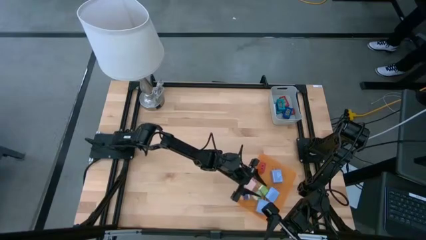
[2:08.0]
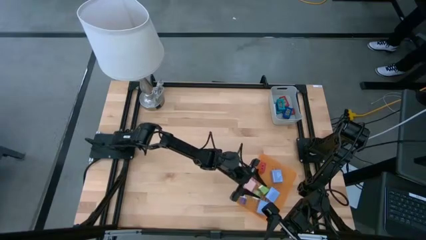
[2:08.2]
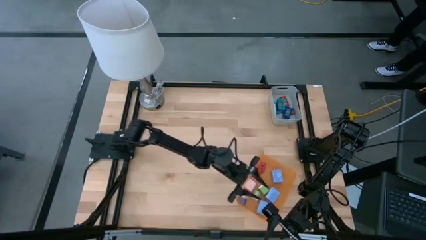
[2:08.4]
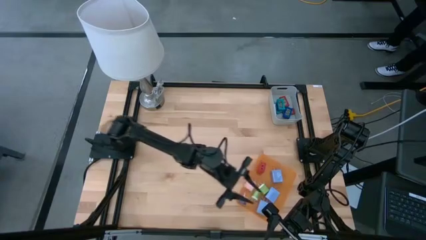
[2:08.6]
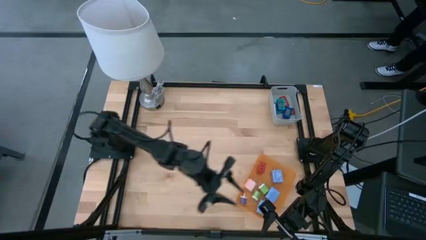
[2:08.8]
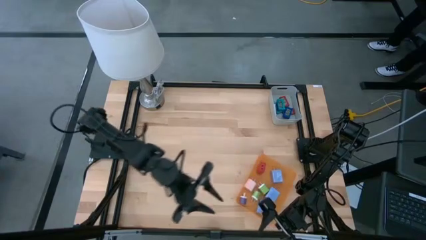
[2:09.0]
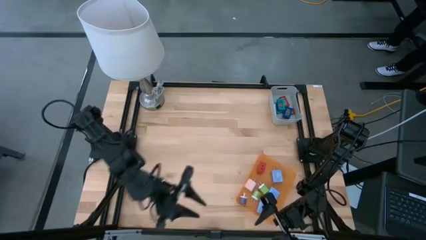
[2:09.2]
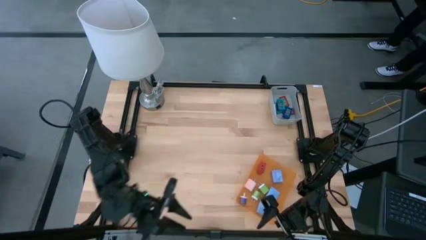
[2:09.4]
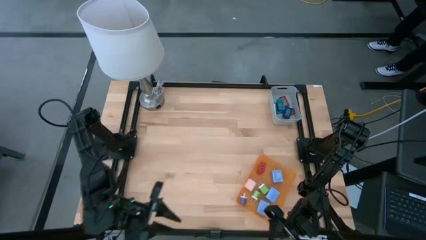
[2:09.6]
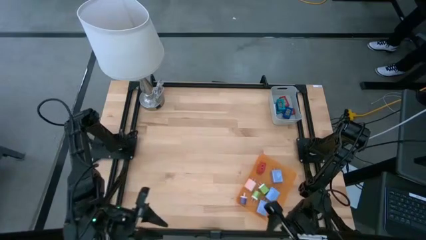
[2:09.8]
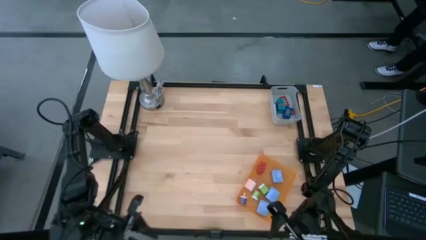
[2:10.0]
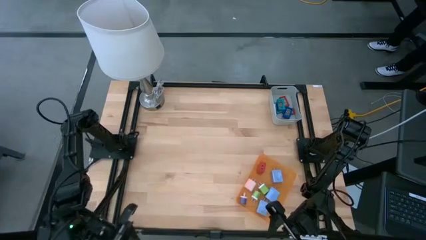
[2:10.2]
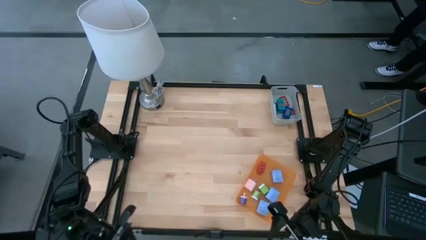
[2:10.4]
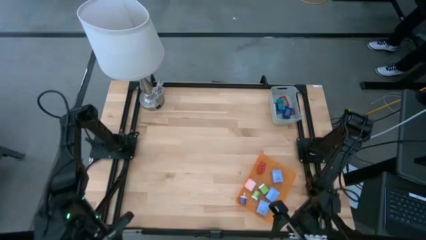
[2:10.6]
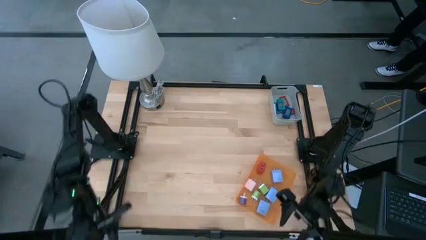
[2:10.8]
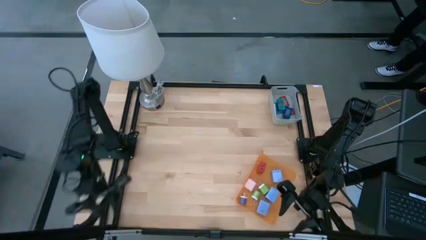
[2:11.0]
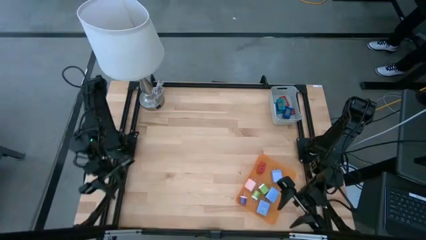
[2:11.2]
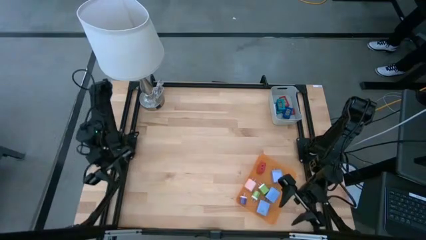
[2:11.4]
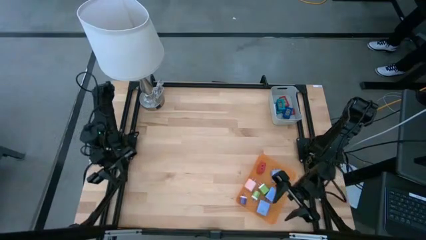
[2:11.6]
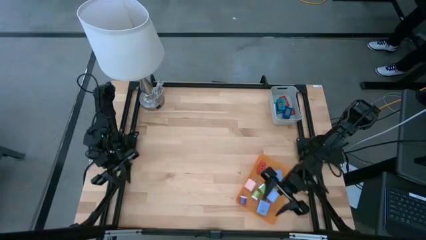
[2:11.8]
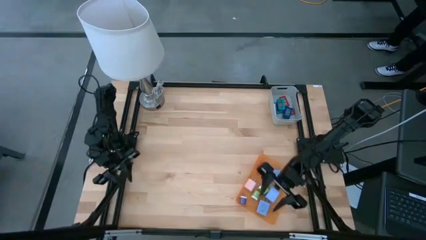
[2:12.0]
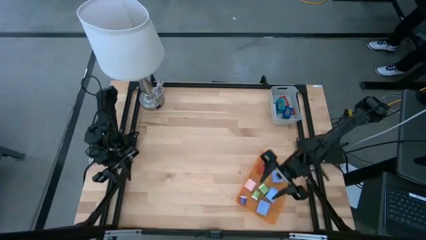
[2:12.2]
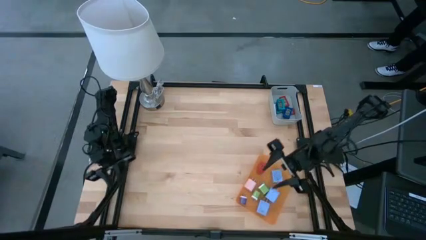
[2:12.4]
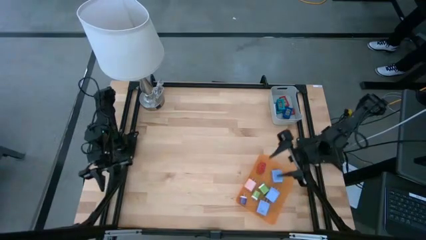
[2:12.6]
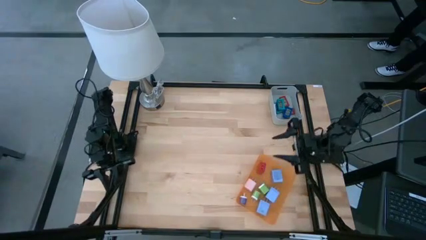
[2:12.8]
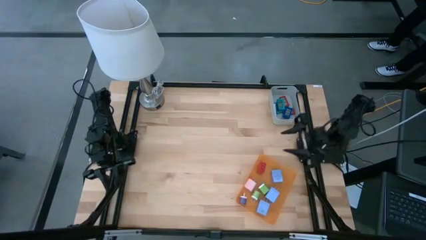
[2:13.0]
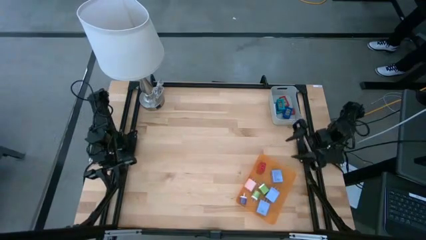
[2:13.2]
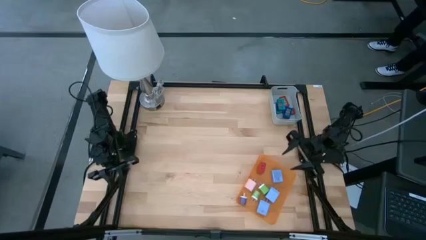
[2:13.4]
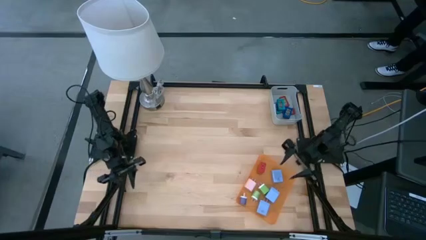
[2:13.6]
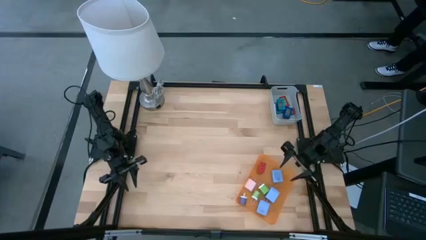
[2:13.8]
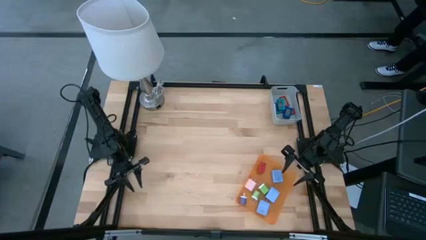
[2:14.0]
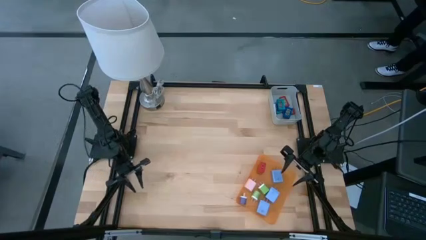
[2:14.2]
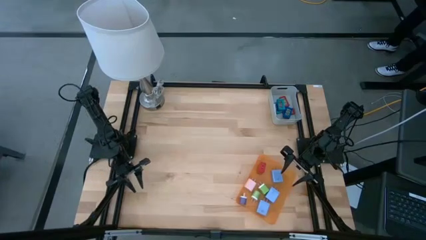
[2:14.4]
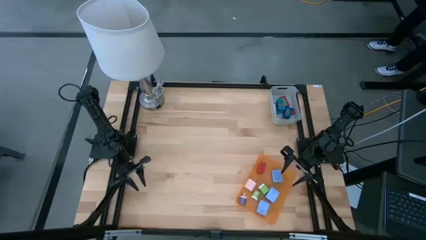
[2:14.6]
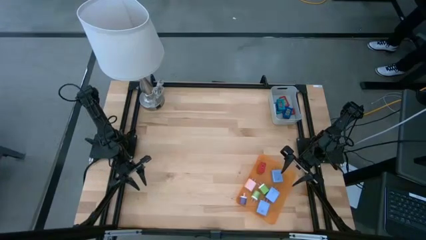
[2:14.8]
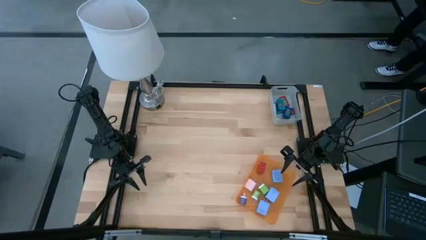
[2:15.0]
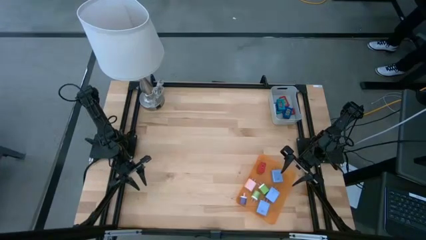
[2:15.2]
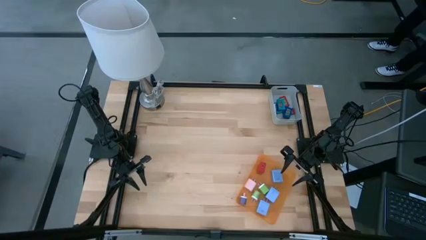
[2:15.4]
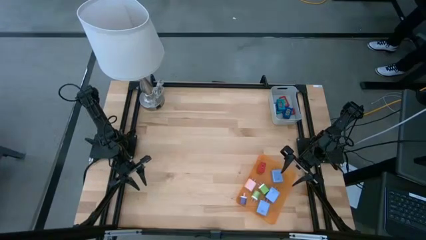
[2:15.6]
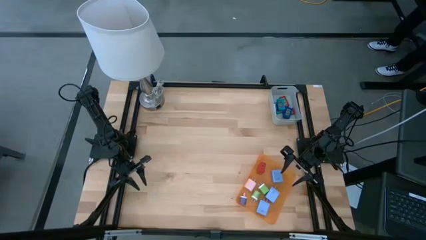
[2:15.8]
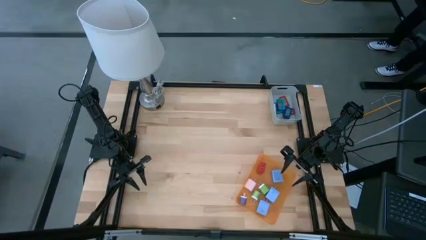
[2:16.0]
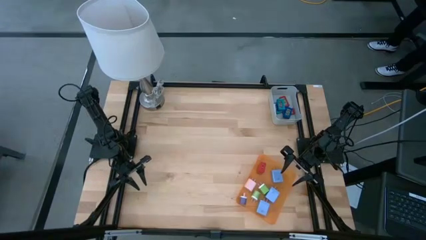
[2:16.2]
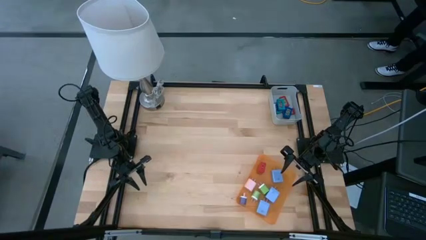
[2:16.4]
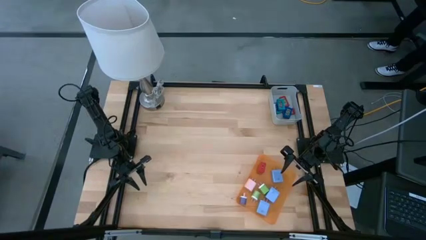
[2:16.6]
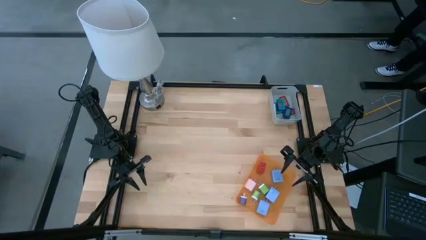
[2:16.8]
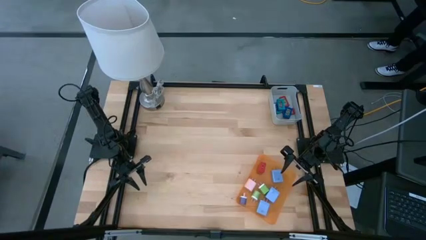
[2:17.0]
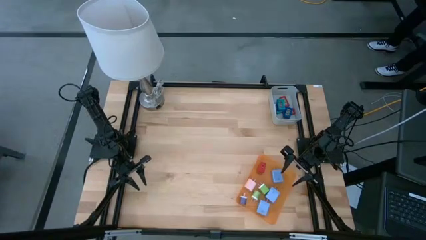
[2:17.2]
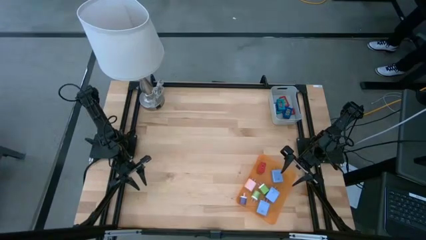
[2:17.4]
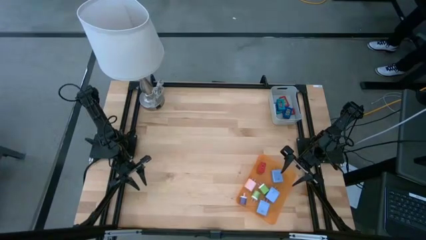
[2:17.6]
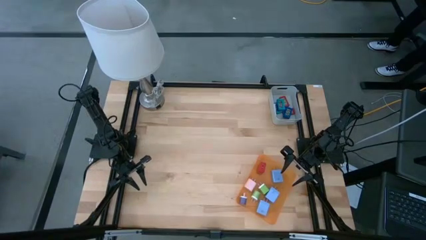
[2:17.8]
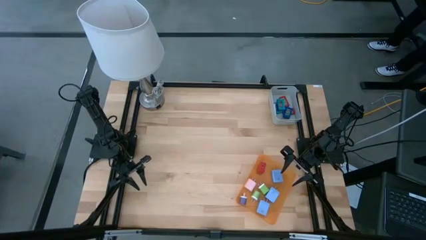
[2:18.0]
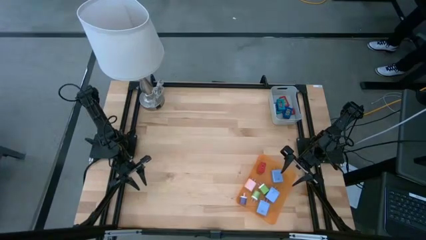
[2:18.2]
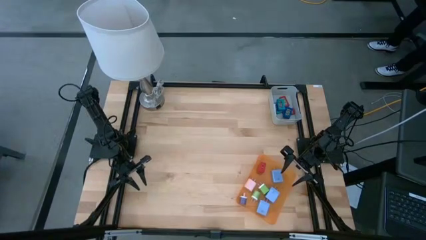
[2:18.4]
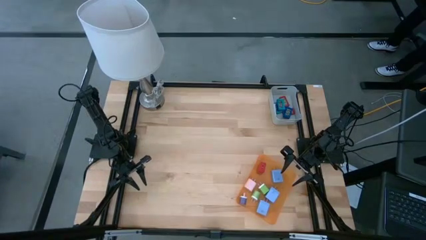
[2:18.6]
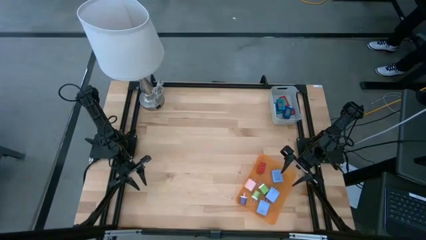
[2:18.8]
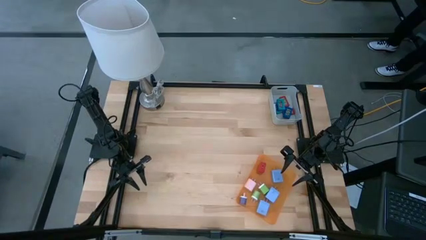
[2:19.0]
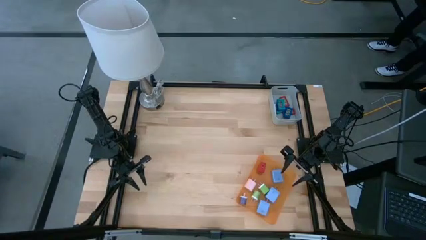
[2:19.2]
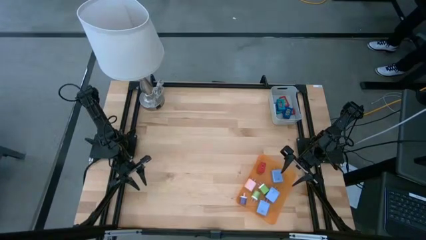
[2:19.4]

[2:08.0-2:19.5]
Task: Pick & Place Office items
Return to Home Position
